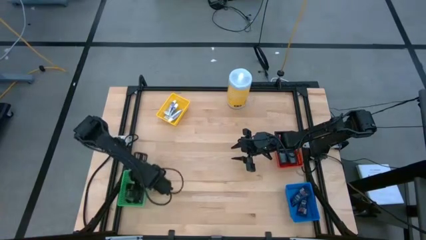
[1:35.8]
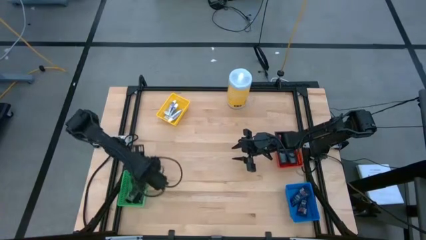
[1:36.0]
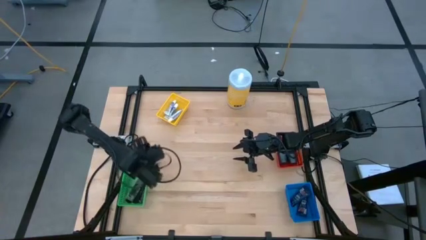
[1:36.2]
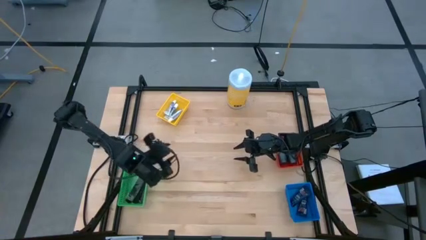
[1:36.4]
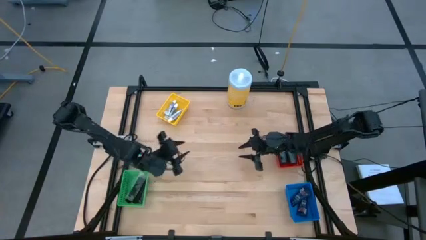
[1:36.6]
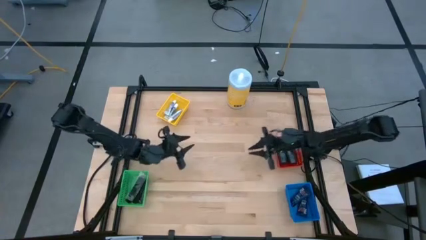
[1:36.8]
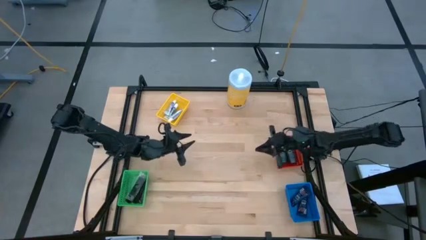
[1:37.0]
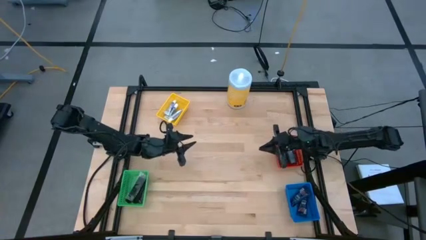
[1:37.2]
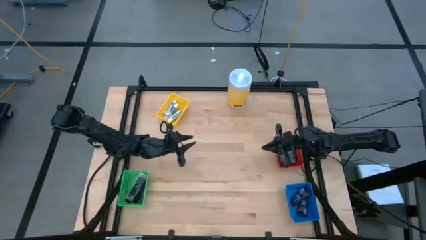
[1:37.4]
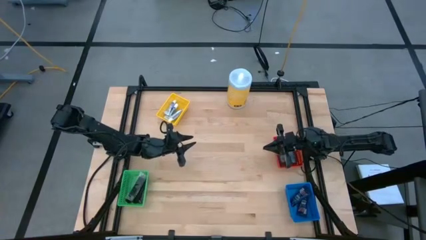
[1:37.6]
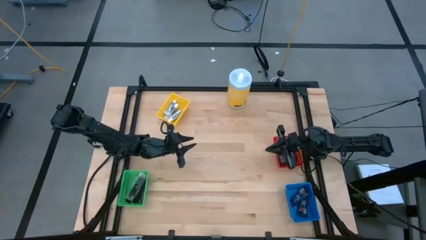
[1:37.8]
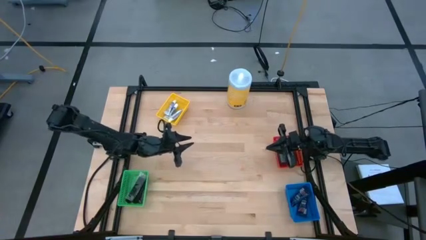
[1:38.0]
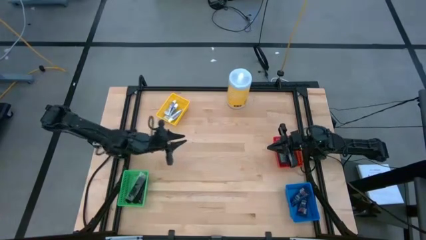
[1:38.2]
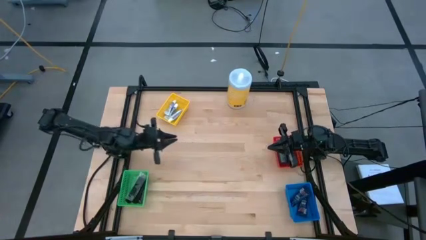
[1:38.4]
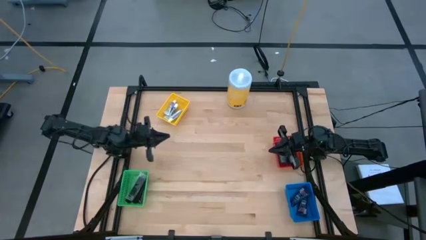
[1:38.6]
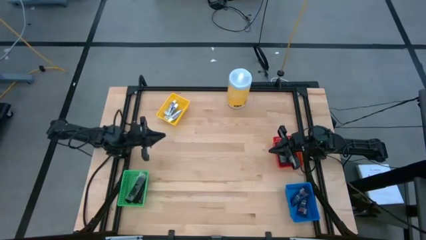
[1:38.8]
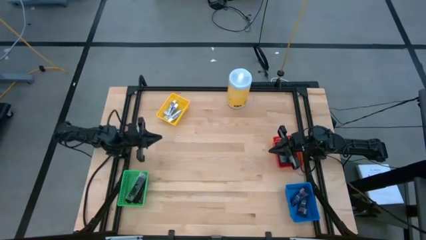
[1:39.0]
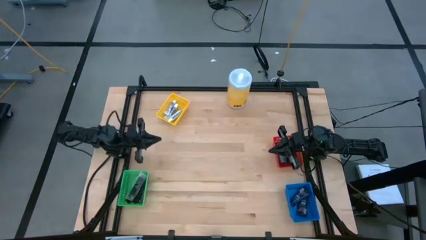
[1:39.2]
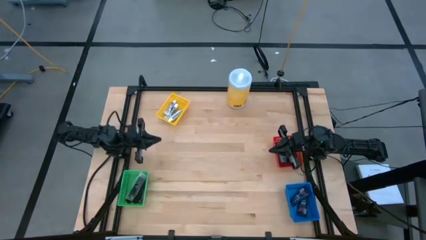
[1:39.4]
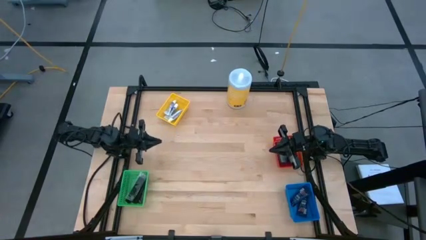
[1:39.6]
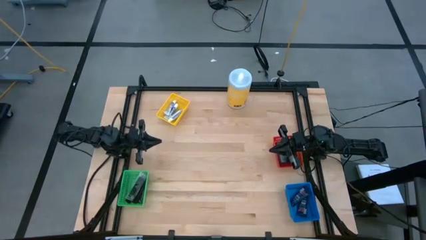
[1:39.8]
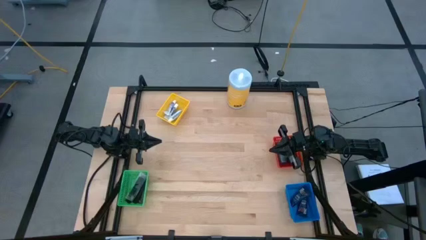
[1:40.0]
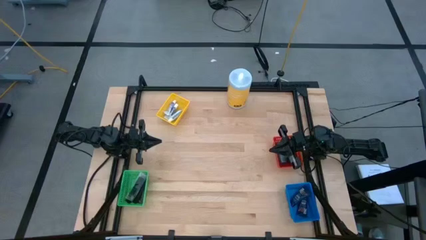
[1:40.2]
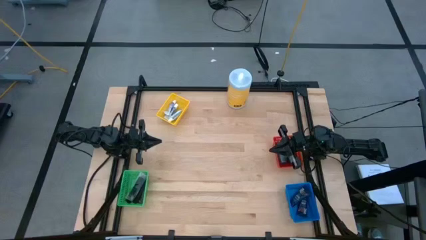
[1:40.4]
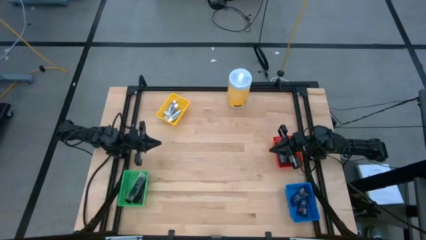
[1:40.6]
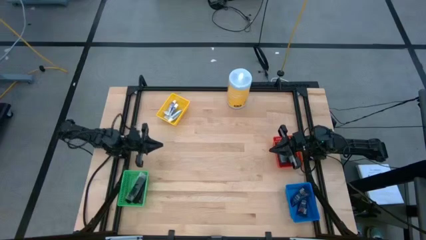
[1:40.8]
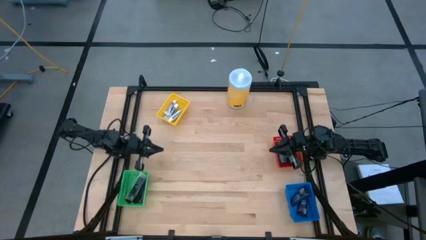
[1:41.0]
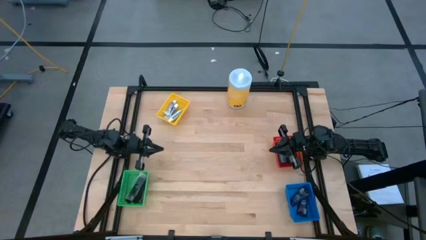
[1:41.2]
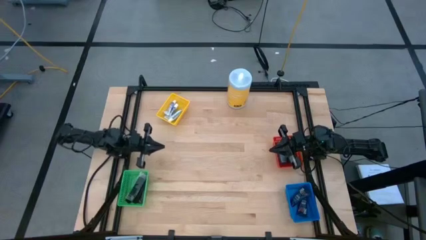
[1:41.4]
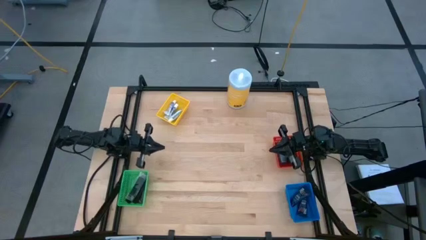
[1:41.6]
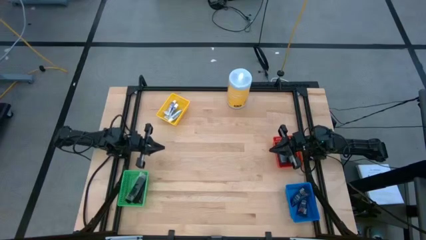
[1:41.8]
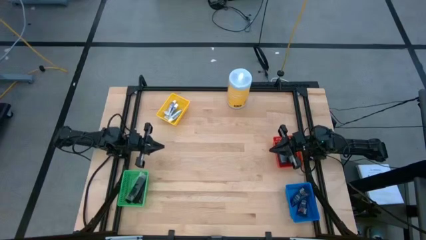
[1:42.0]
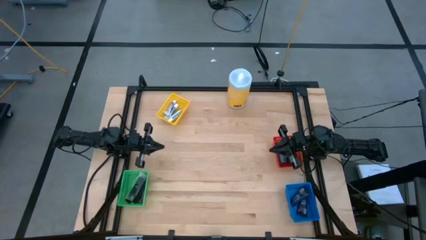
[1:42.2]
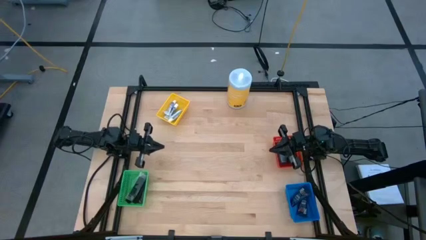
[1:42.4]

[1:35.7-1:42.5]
Task: Pick & Place Travel size toiletries
Return to Home Position
